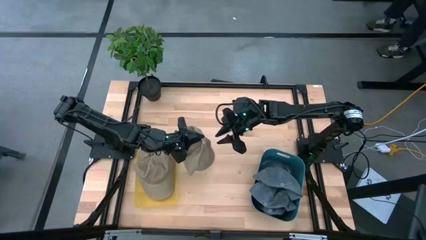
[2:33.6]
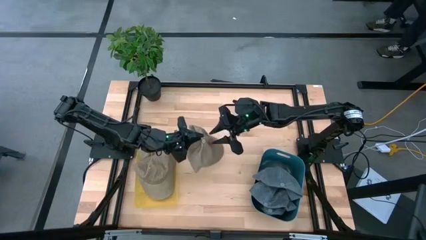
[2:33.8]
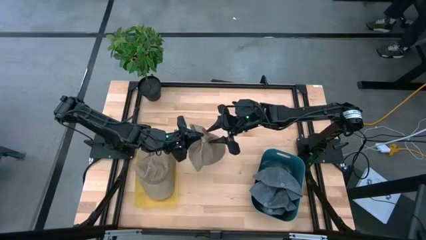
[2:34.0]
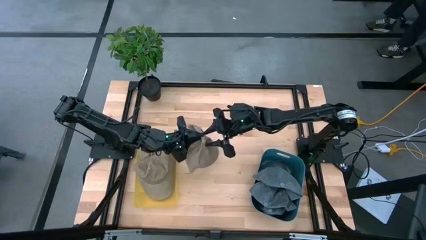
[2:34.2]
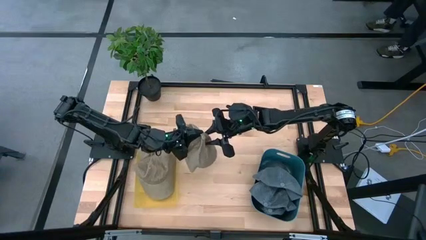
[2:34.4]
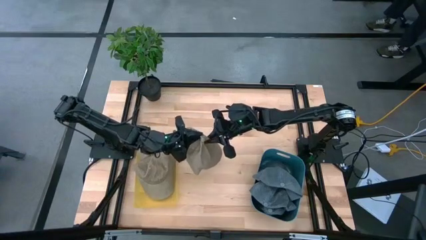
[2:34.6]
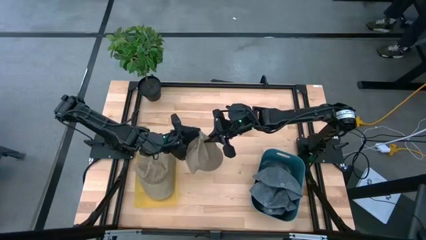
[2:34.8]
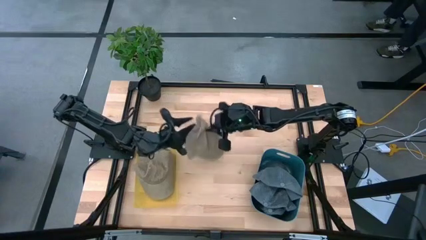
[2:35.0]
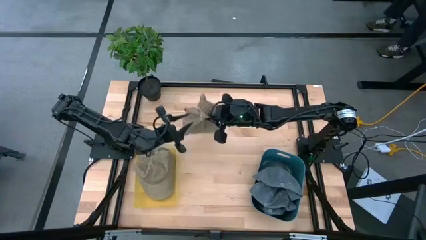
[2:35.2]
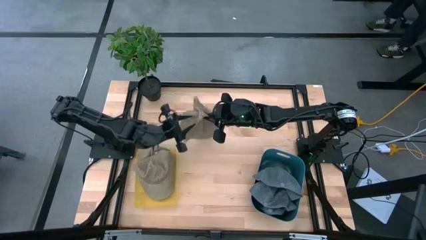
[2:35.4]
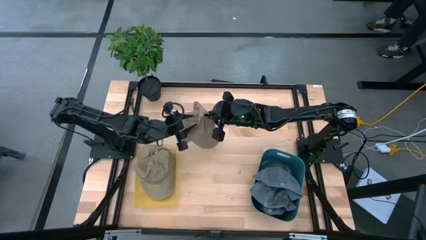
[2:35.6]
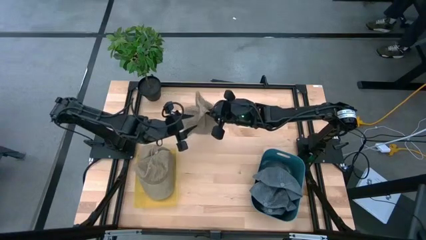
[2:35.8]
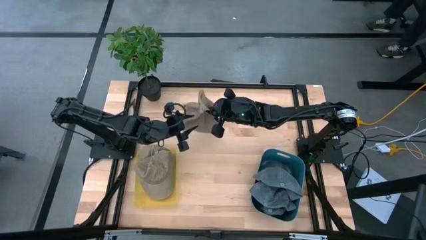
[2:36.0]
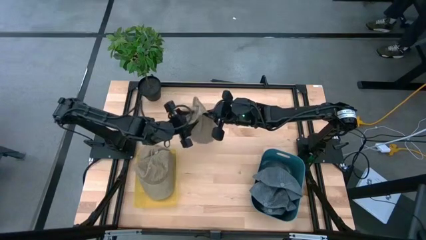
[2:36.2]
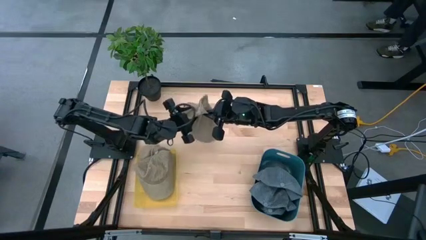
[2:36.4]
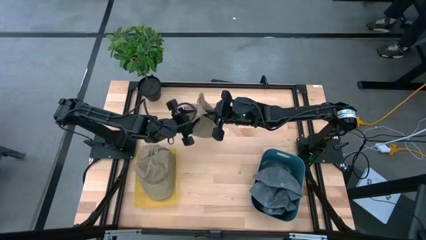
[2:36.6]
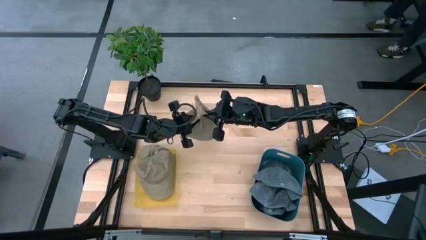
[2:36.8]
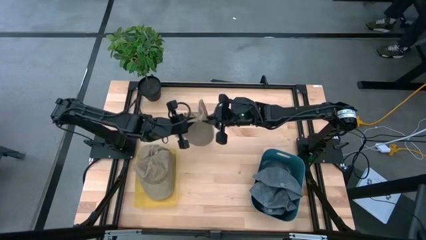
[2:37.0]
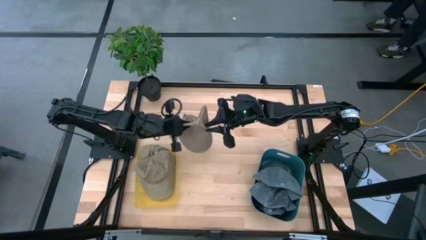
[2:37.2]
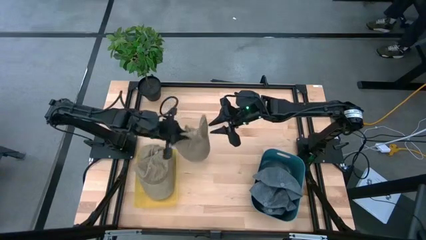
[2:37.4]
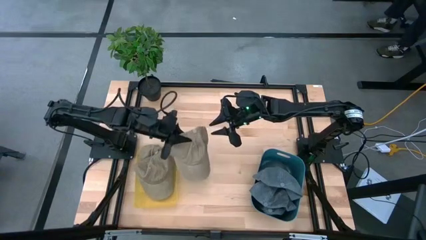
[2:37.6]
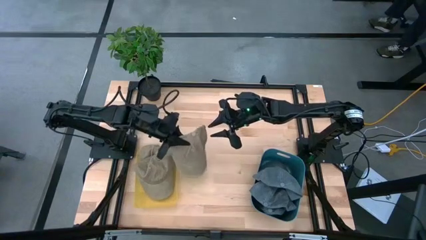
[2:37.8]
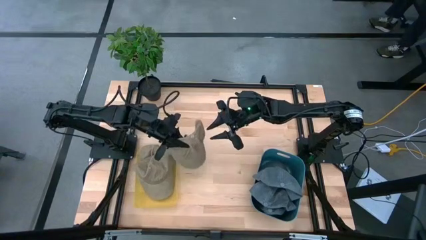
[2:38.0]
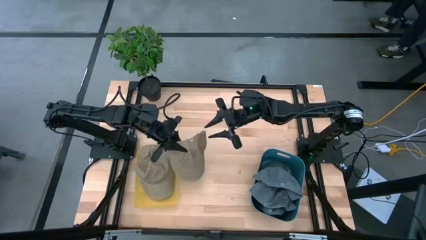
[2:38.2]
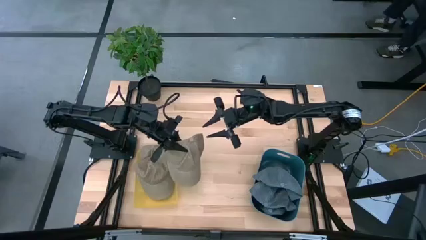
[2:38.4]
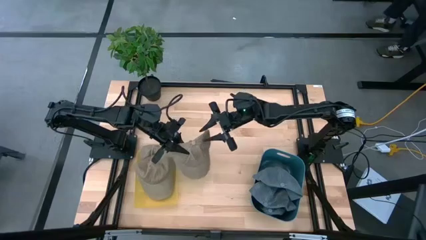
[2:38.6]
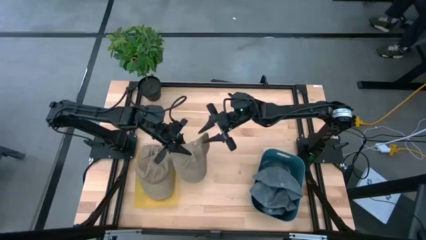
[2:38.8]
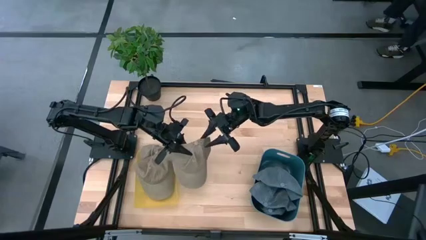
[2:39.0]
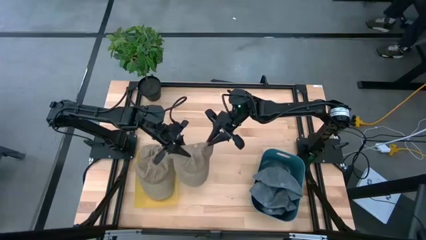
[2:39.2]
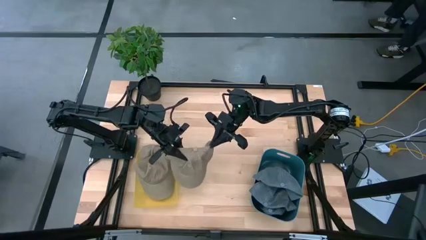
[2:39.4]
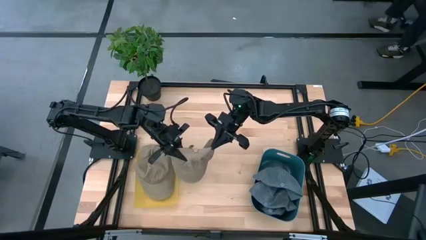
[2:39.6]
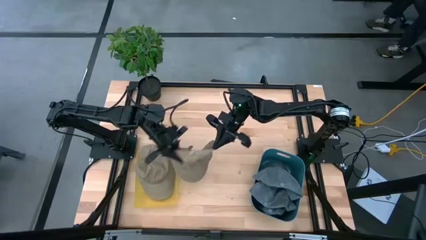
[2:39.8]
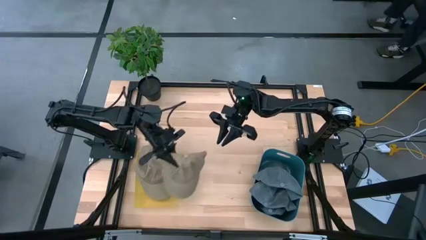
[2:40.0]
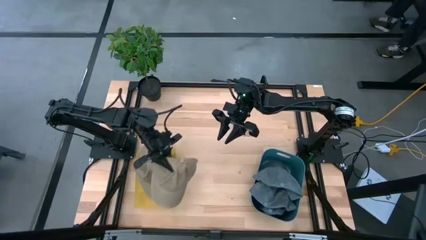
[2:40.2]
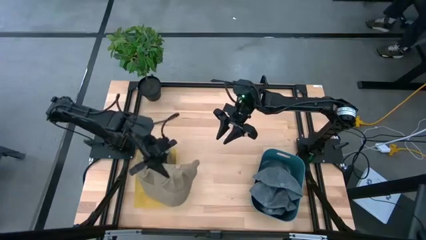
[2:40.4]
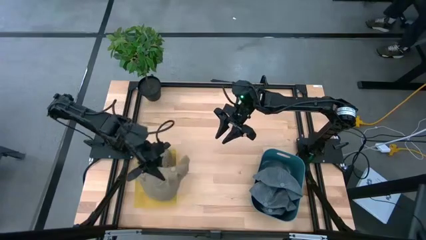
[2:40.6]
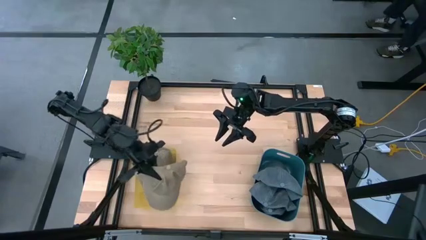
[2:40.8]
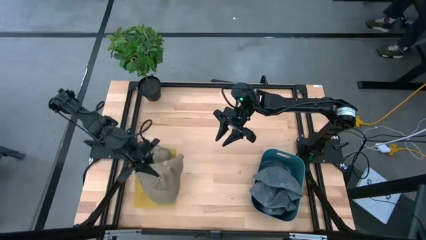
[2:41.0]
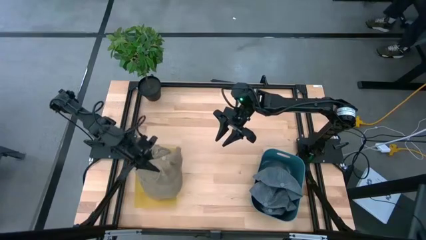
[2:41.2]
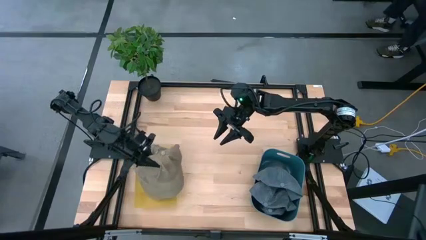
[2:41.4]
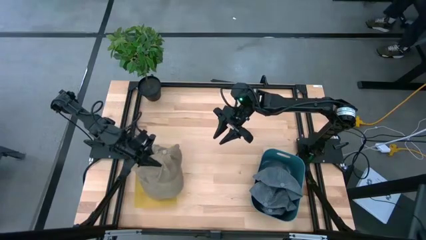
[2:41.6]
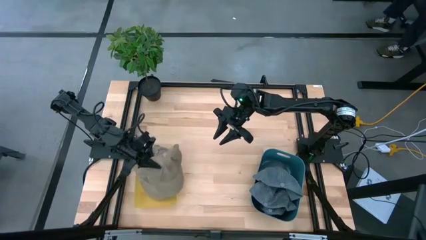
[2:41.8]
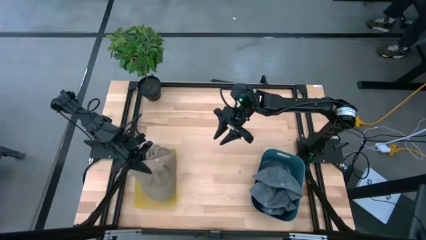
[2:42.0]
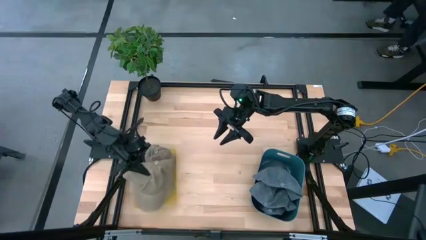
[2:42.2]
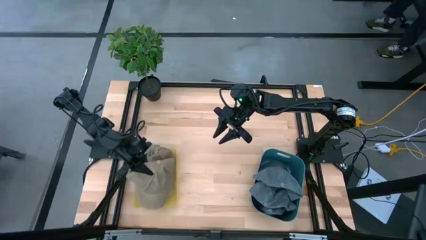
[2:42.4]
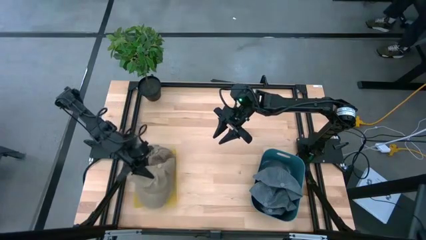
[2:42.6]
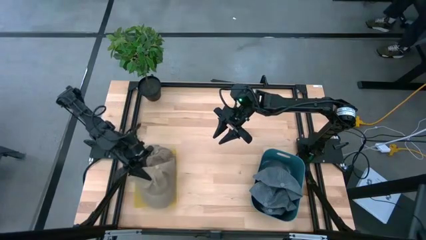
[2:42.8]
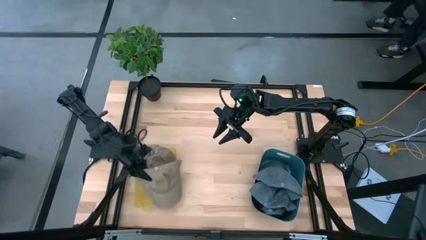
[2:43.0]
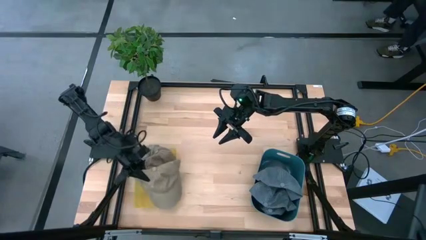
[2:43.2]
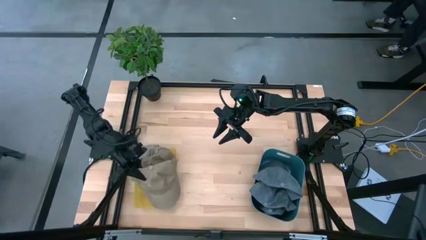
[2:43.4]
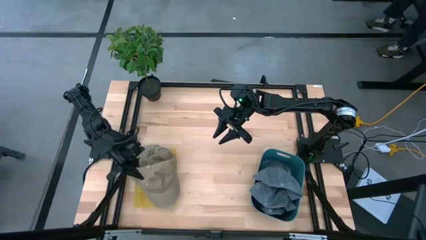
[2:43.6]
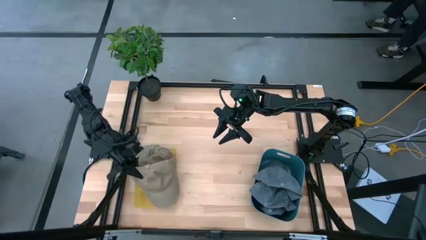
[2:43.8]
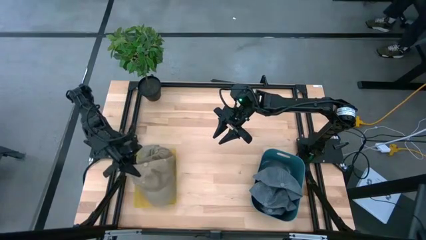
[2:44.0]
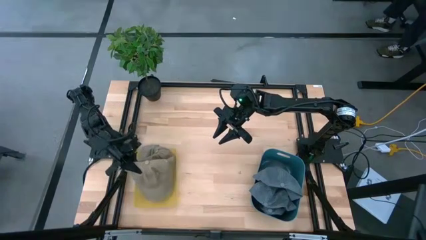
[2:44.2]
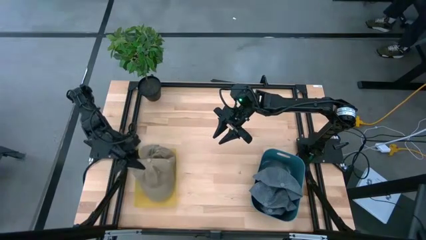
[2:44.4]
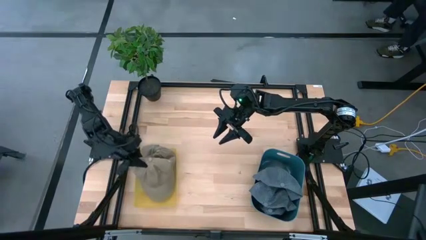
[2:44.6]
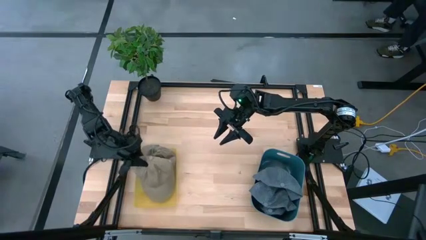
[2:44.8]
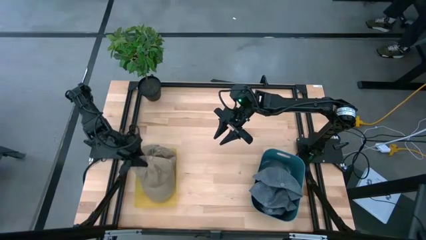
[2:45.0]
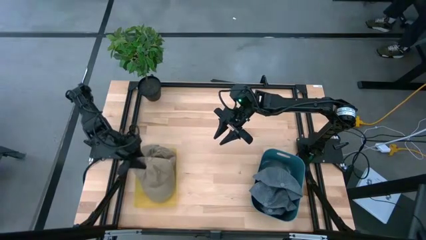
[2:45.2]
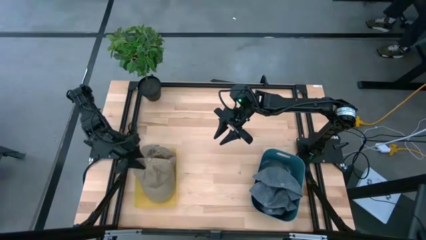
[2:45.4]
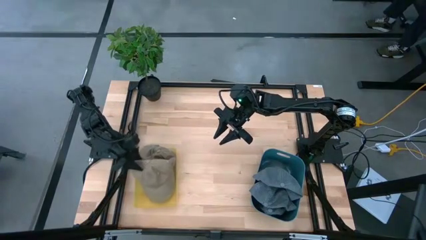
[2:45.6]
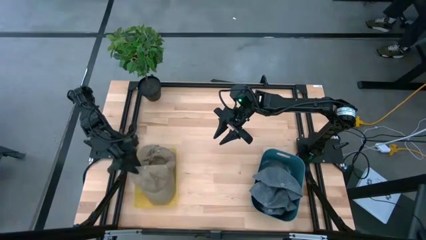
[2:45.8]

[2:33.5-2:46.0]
Task: Pick & Place hat
Put the brown cap into the yellow bin
